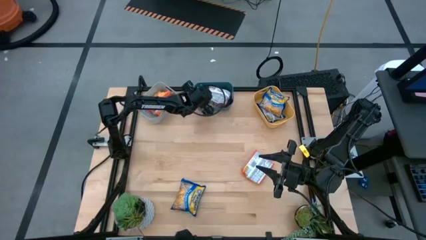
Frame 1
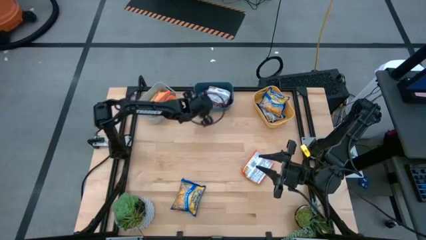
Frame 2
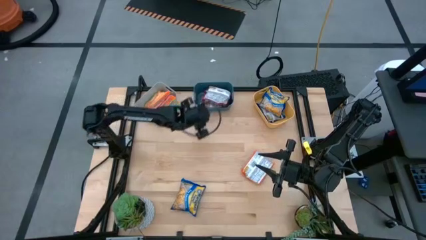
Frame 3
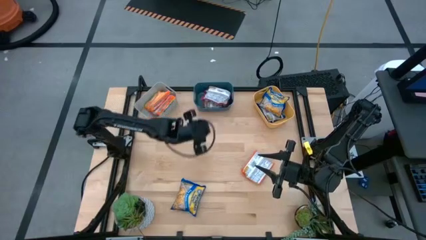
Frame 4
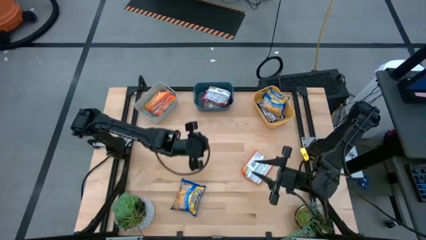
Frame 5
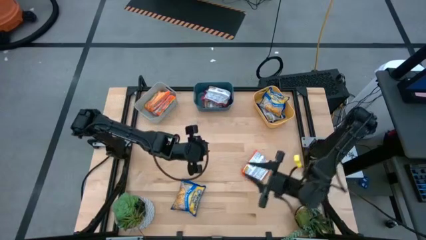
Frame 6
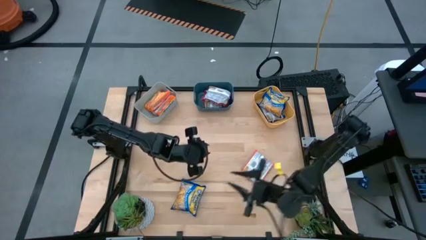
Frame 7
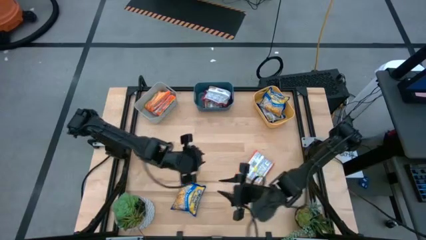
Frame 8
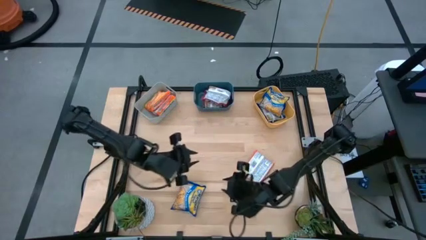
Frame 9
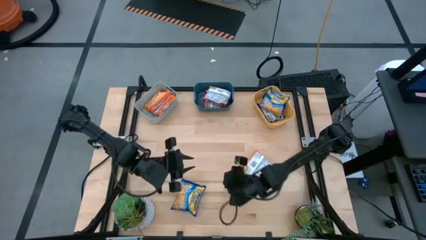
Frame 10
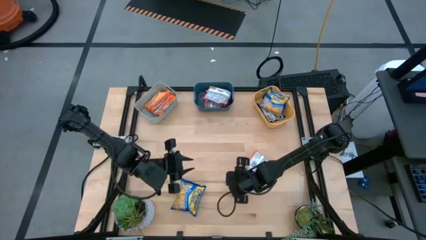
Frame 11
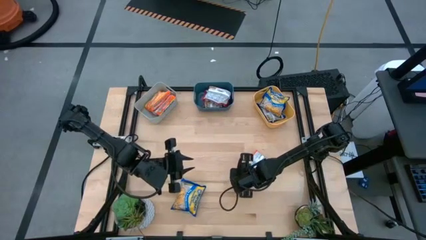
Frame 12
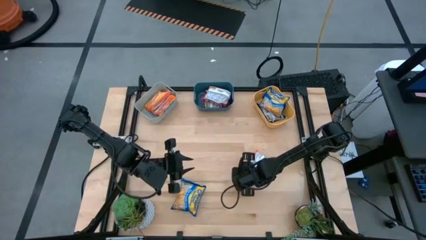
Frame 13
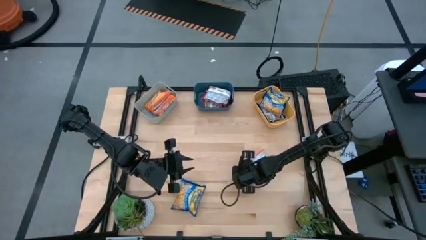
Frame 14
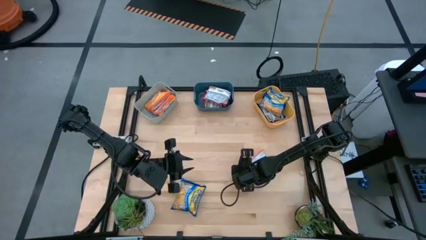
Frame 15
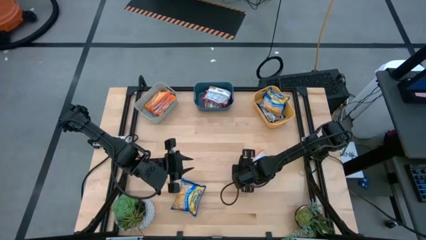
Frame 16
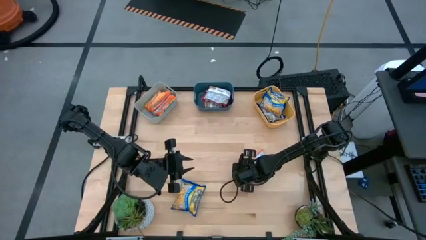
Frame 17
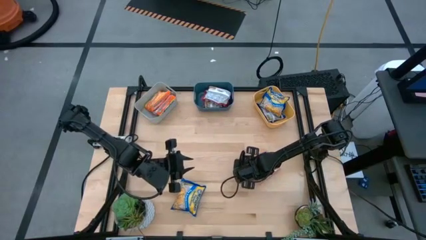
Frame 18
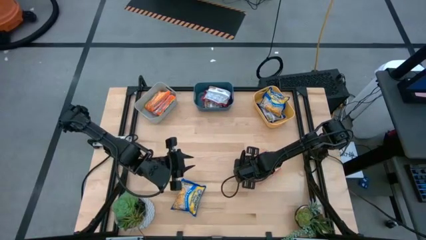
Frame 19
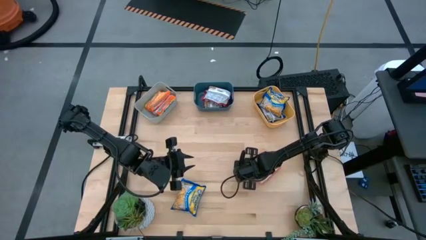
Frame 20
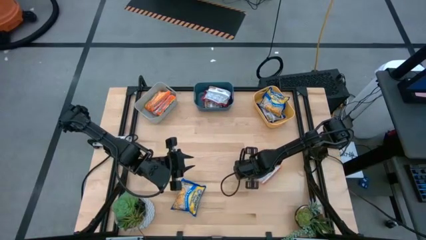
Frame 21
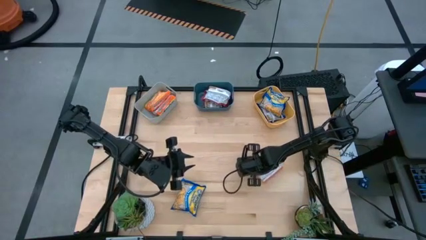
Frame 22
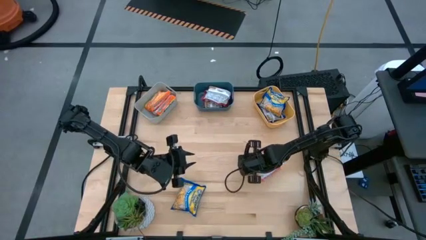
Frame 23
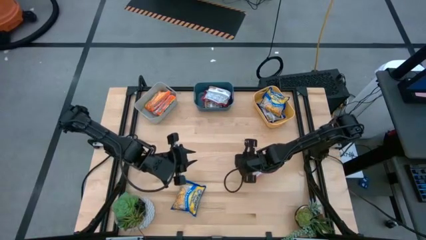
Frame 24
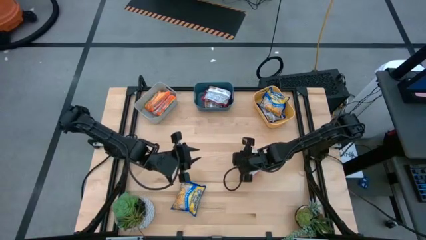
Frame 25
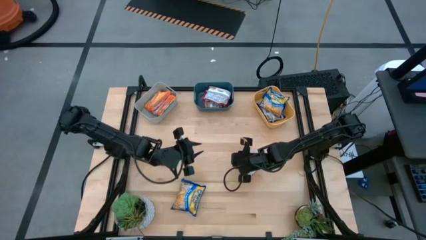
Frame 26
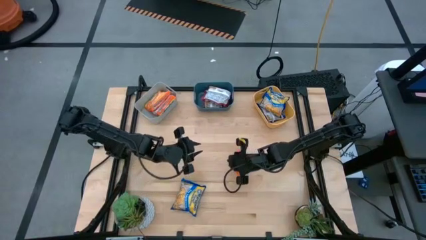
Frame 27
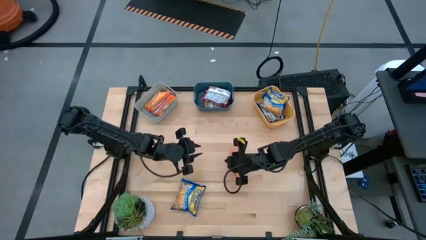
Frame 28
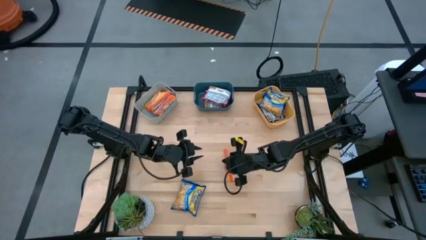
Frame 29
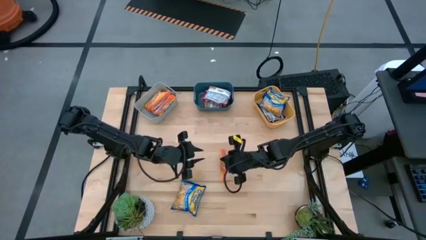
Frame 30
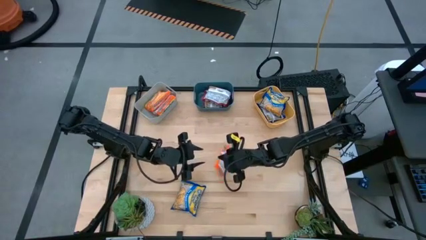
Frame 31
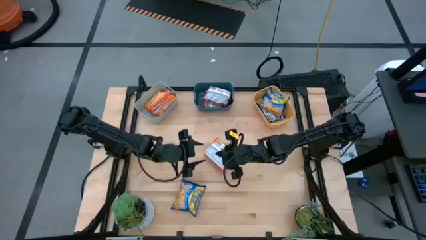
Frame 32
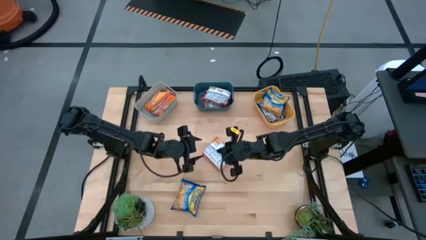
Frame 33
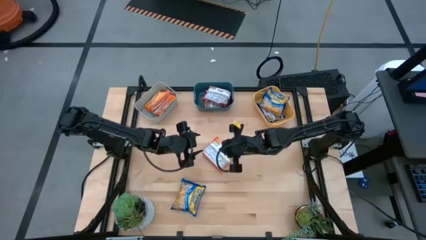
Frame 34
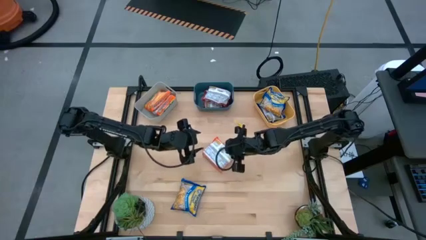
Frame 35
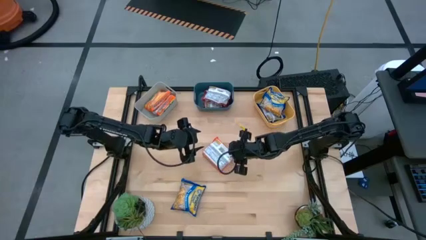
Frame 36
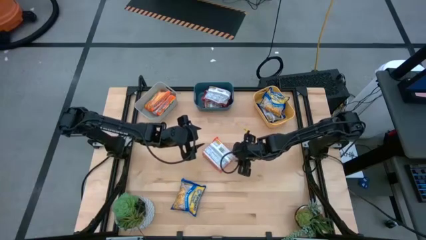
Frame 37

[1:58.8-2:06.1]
Task: Sort Maruchan noodles
Put the orange noodle pack into the blue bin

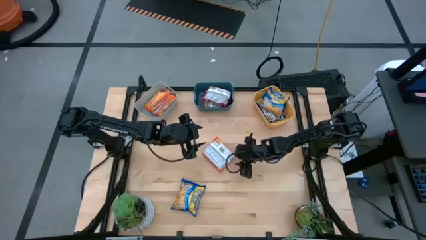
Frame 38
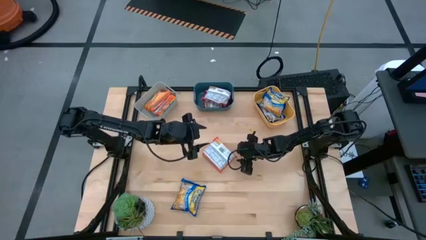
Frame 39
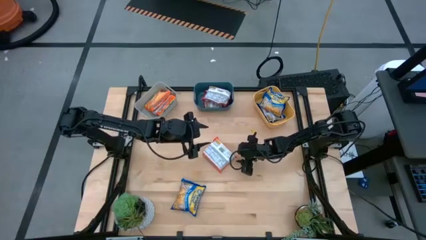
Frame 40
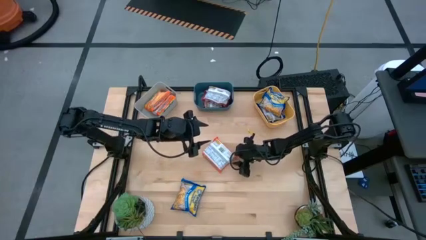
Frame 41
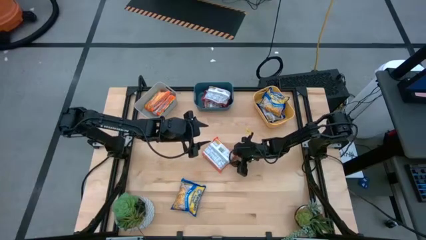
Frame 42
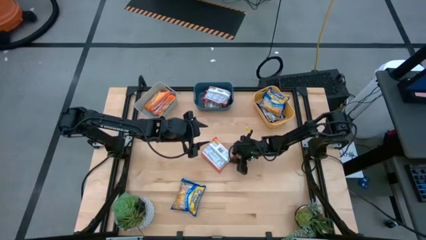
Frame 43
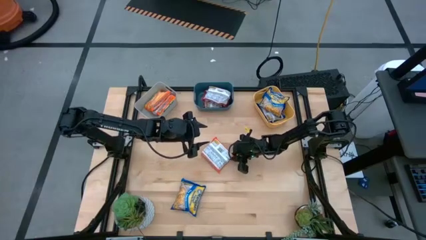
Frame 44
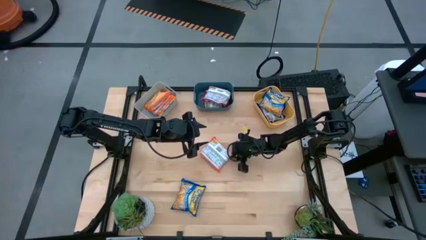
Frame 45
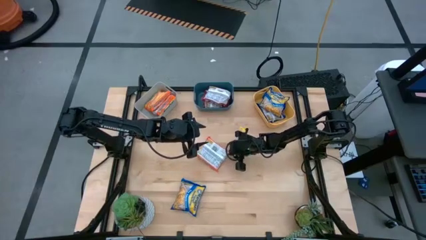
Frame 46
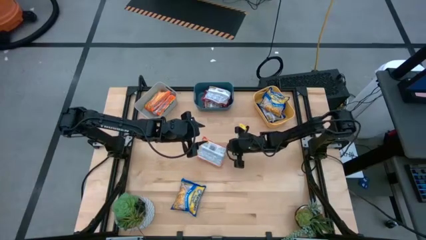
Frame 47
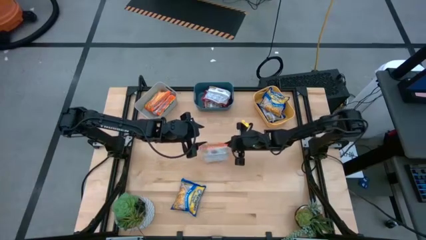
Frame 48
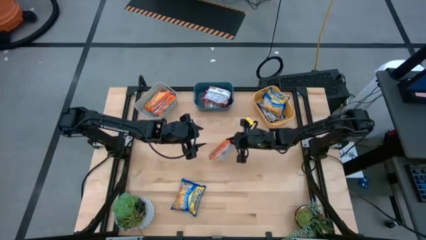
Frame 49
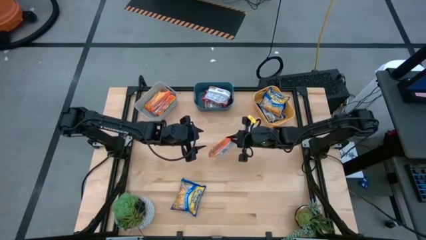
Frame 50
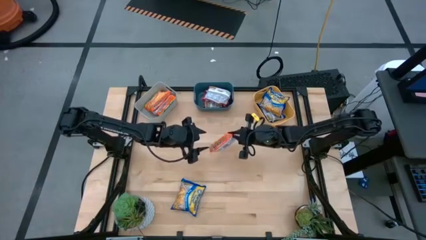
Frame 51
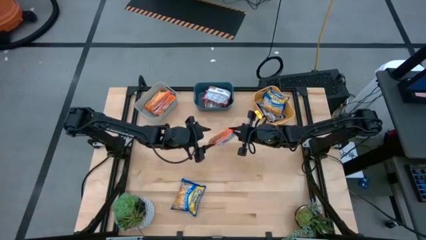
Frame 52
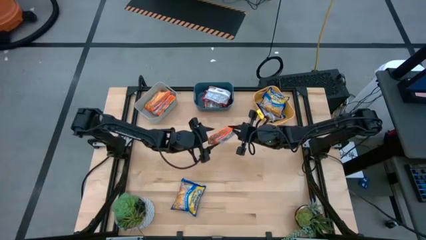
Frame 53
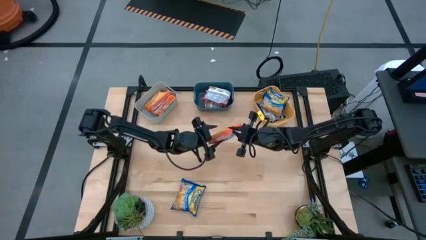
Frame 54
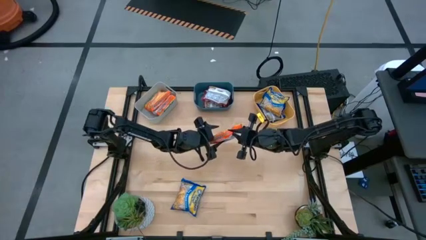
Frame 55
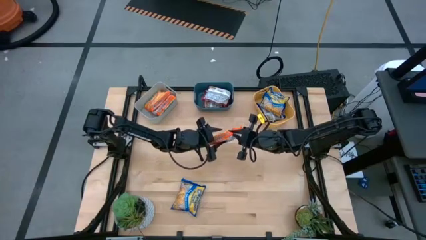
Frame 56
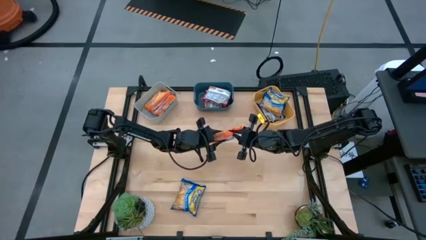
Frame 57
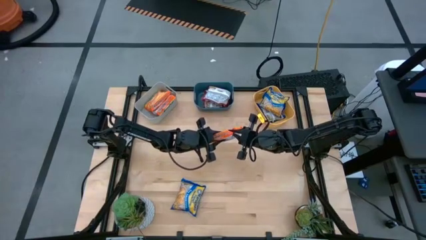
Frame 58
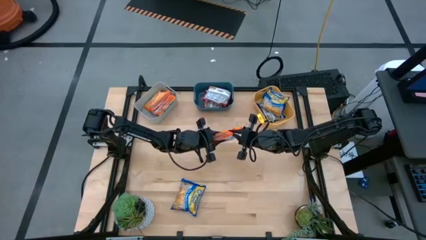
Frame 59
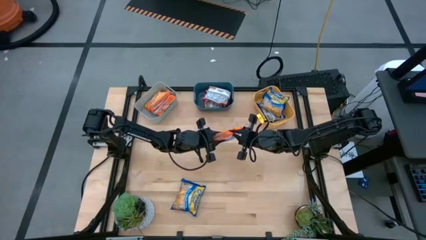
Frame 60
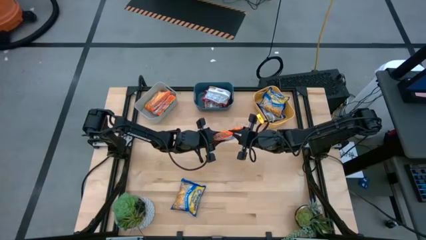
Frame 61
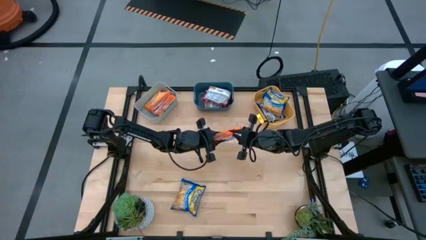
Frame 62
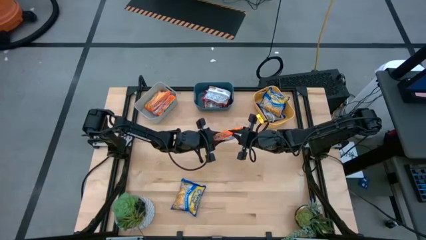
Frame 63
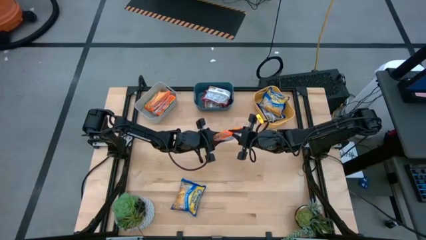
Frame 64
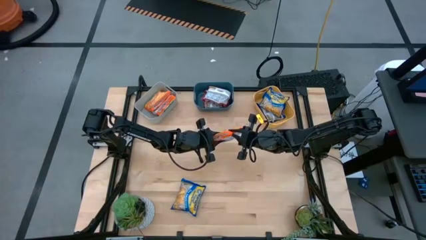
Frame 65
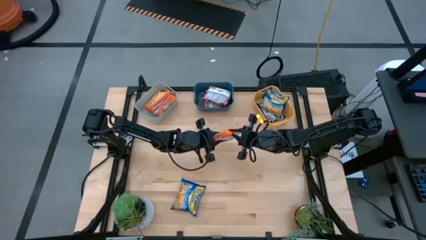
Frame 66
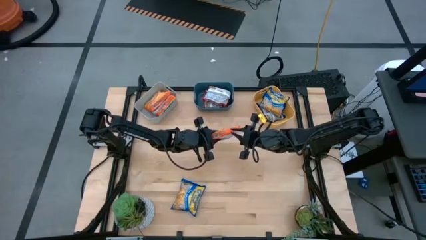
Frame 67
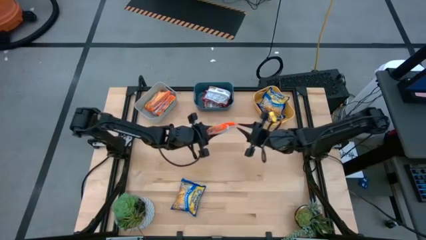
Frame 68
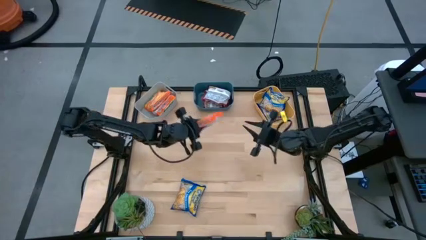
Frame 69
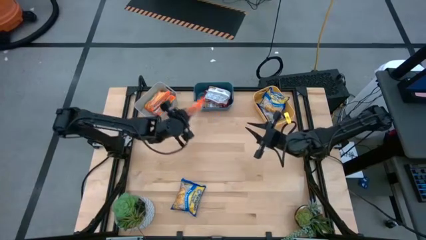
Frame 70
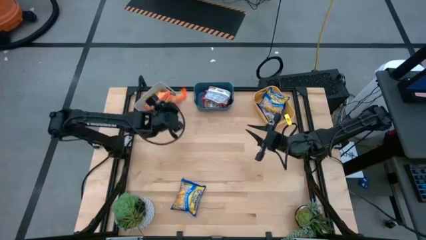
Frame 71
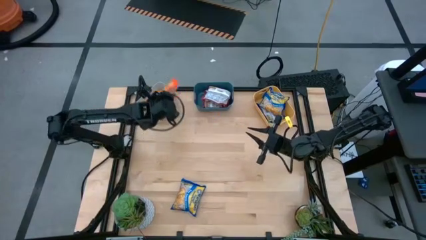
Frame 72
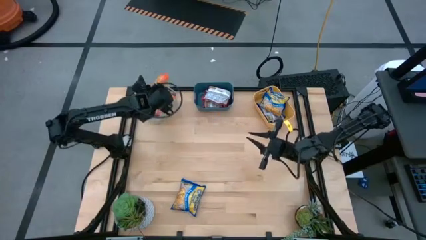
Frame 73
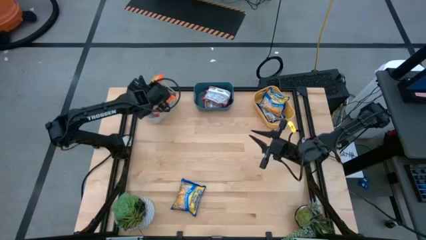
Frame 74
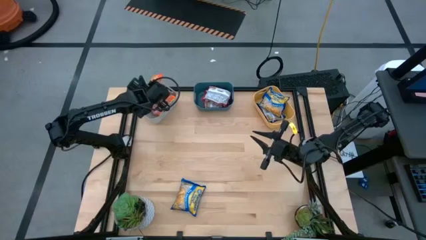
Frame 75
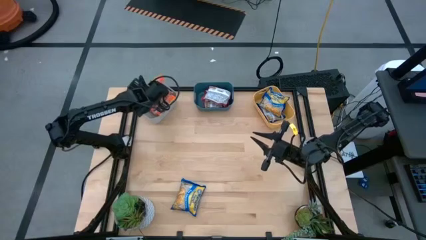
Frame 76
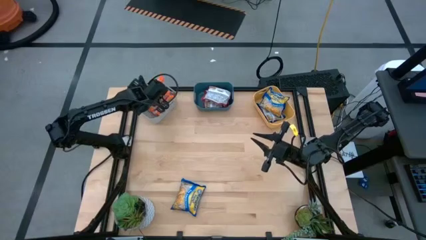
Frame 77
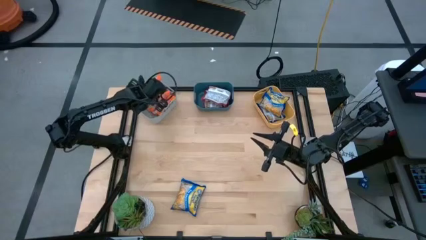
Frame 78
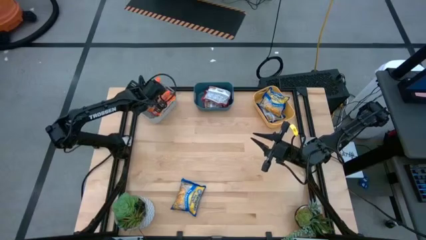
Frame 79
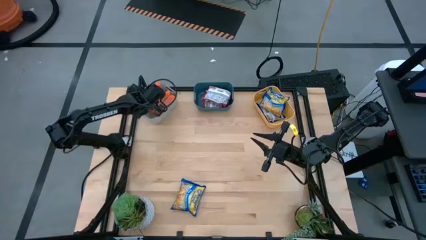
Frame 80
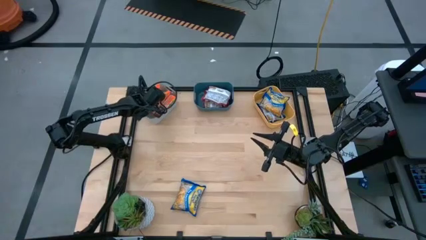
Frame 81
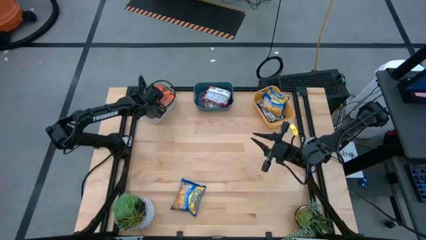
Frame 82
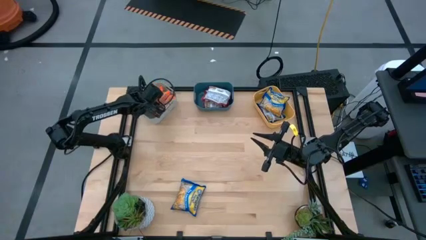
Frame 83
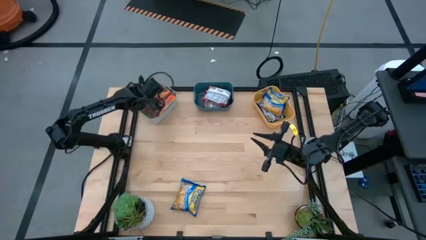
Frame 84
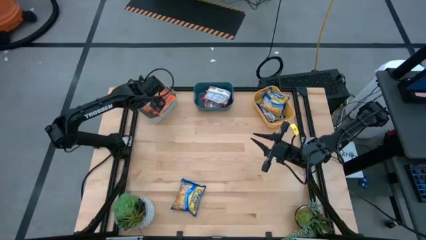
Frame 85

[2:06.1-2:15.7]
Put the orange noodle pack into the blue bin
